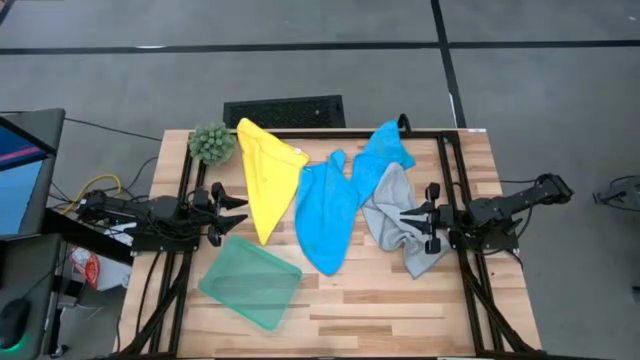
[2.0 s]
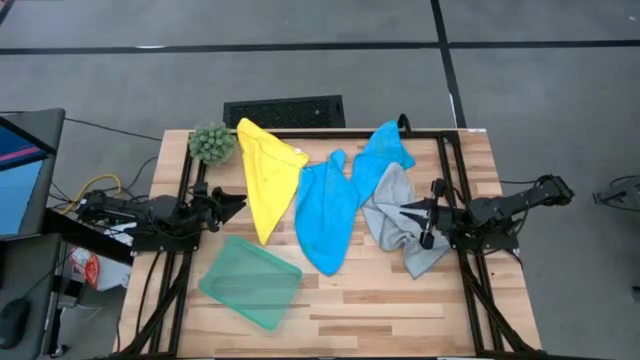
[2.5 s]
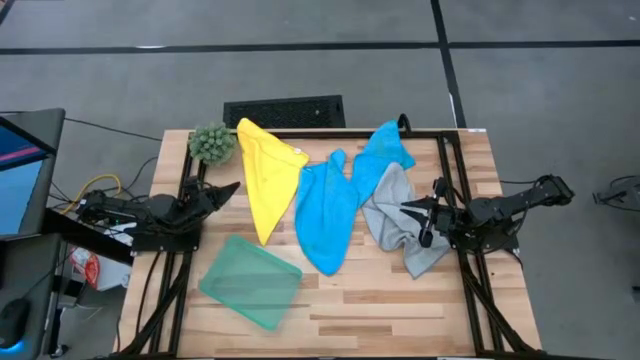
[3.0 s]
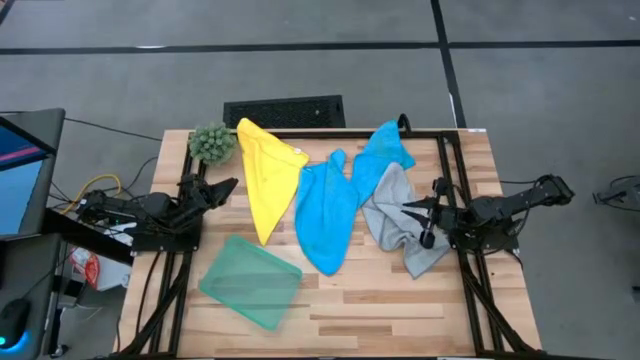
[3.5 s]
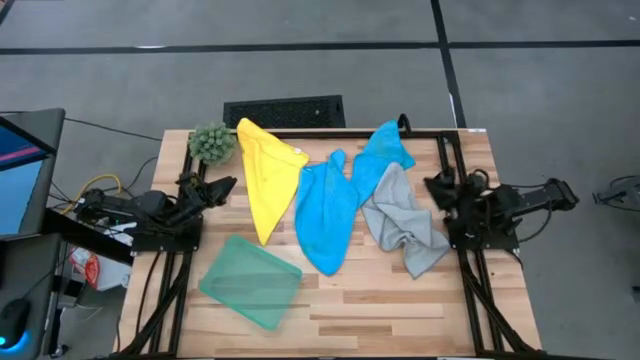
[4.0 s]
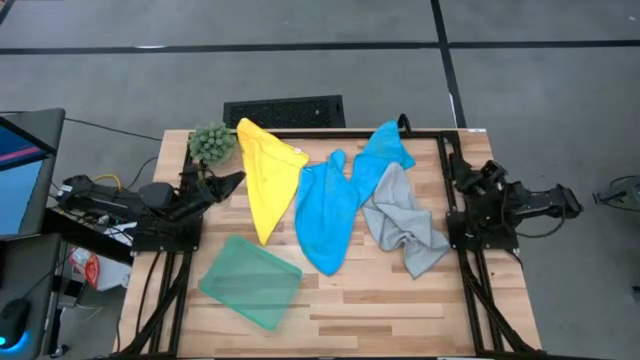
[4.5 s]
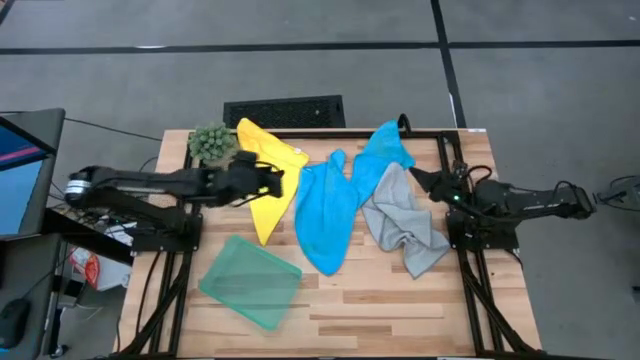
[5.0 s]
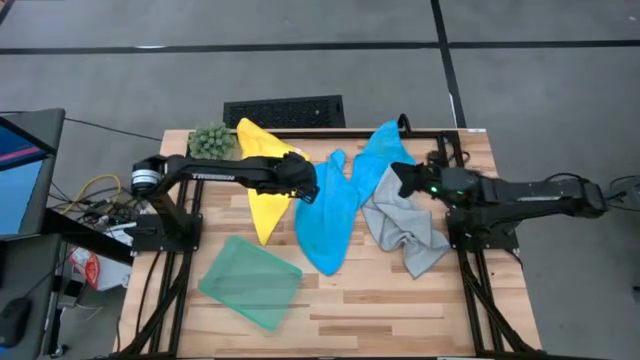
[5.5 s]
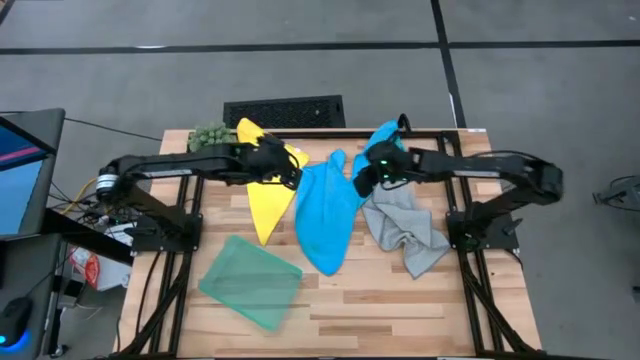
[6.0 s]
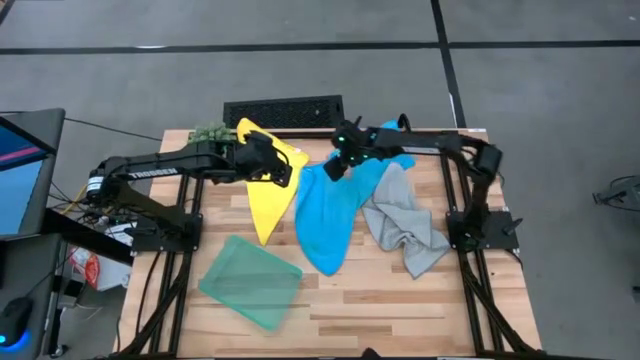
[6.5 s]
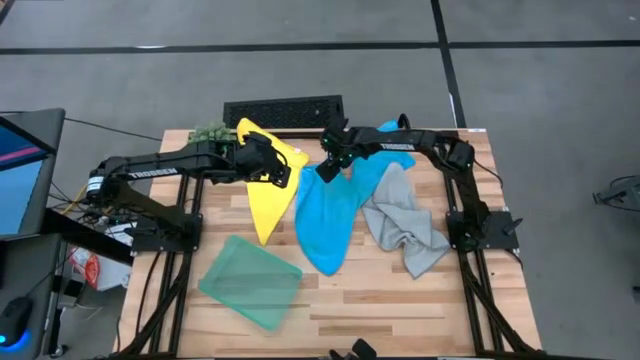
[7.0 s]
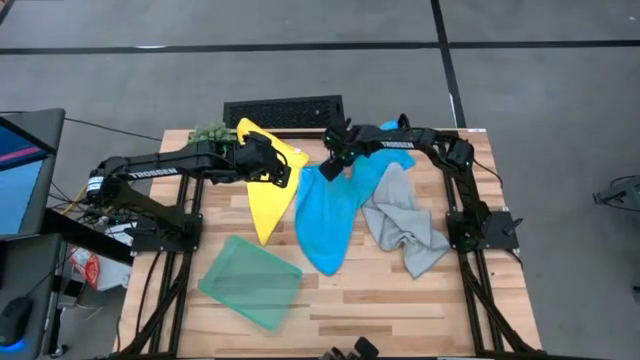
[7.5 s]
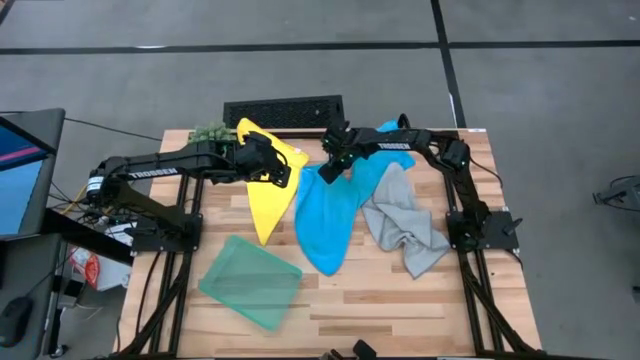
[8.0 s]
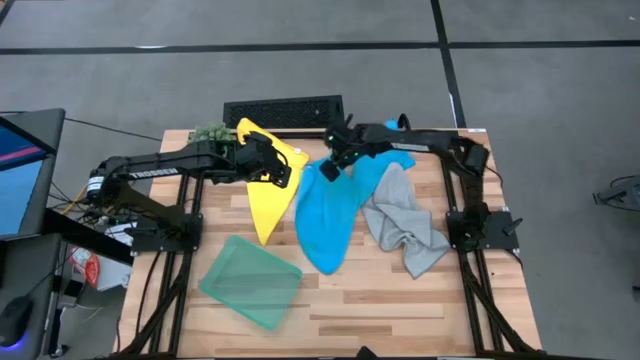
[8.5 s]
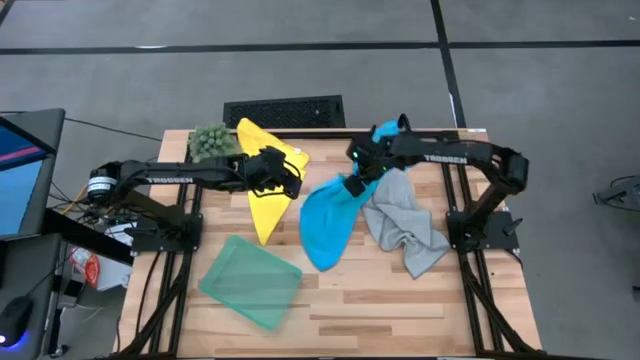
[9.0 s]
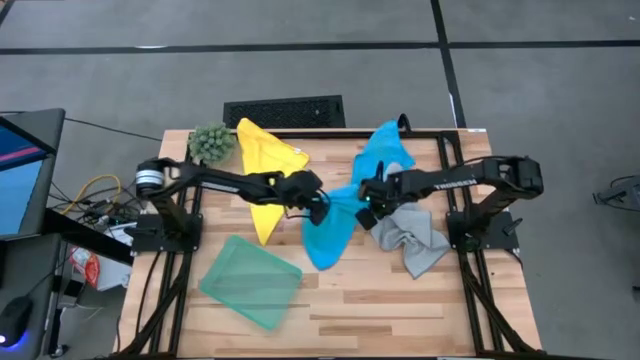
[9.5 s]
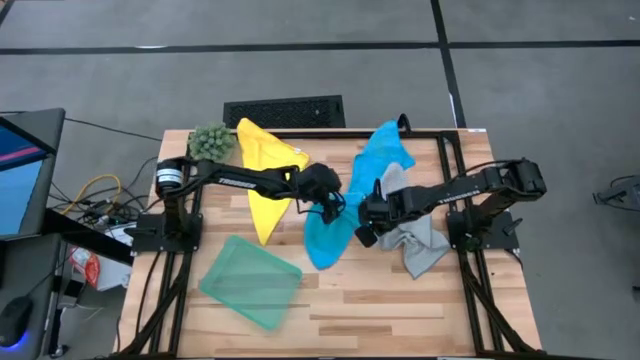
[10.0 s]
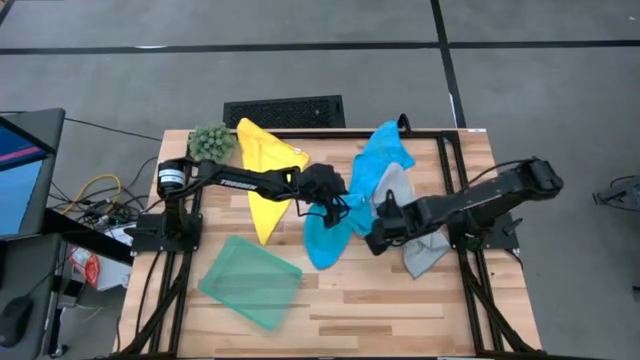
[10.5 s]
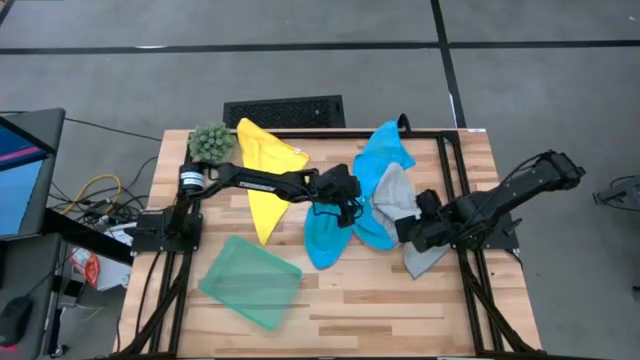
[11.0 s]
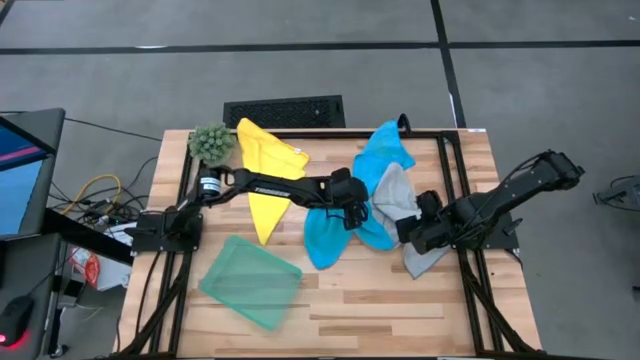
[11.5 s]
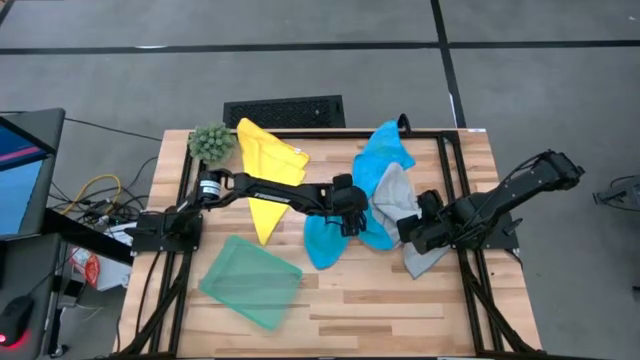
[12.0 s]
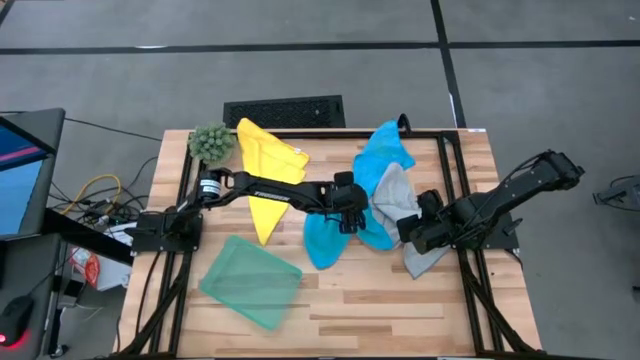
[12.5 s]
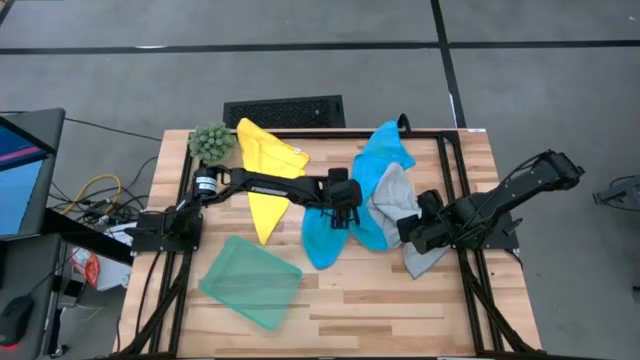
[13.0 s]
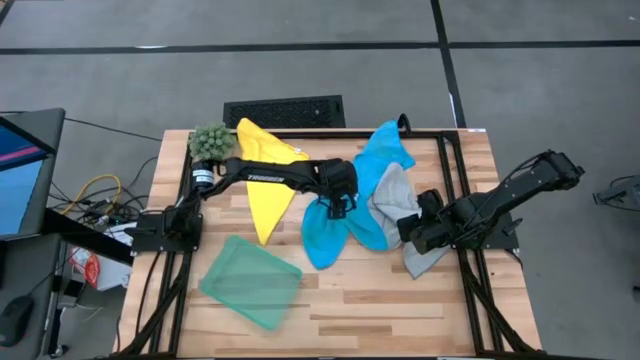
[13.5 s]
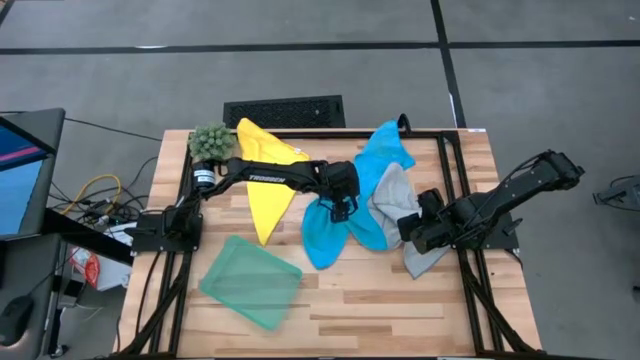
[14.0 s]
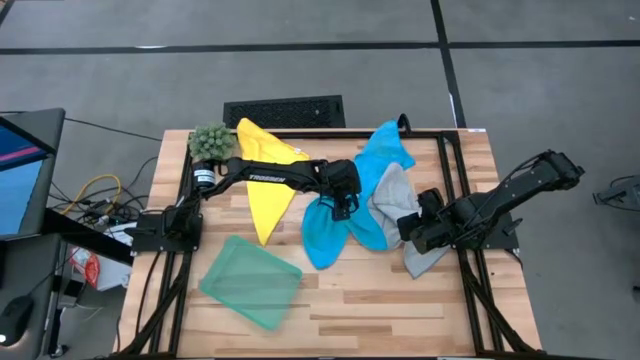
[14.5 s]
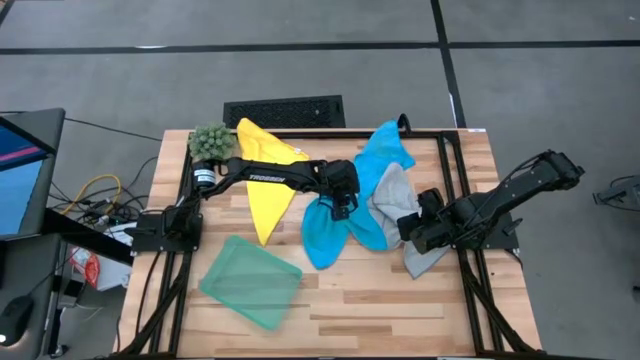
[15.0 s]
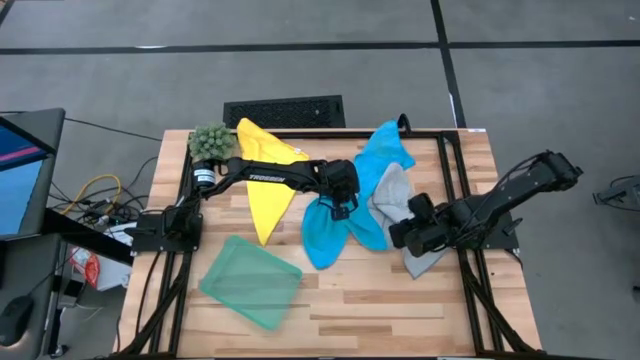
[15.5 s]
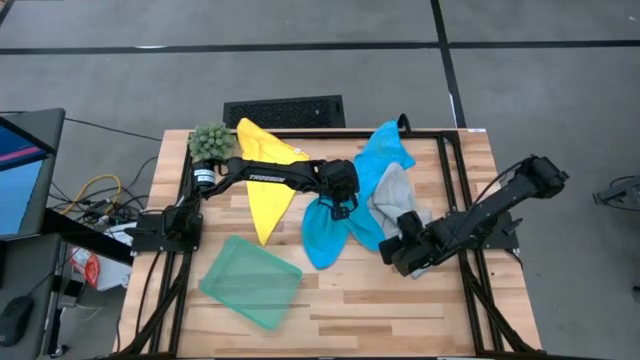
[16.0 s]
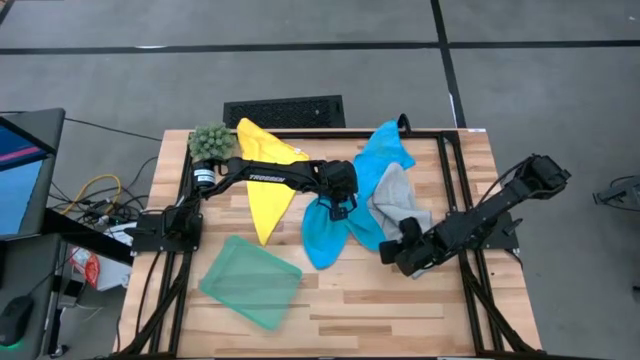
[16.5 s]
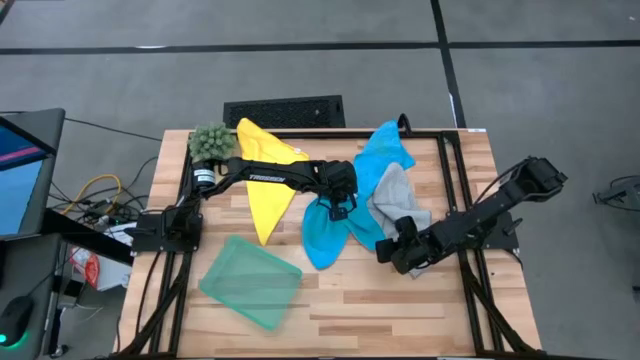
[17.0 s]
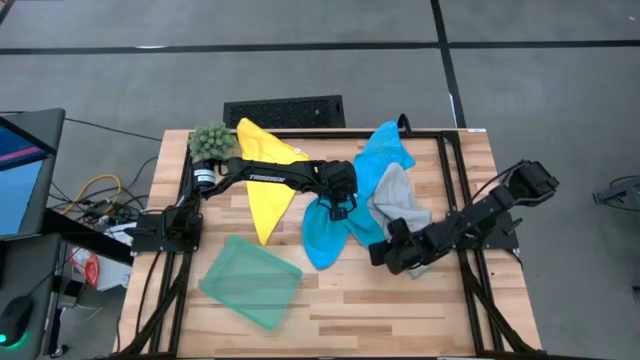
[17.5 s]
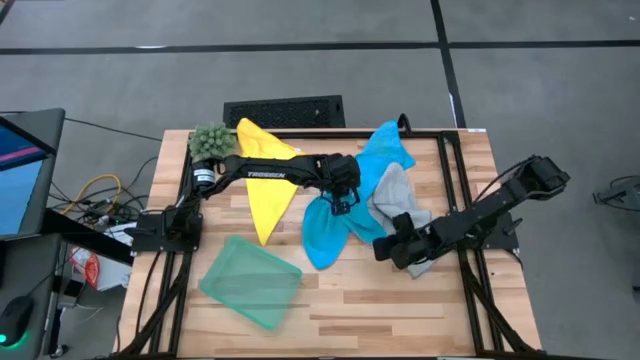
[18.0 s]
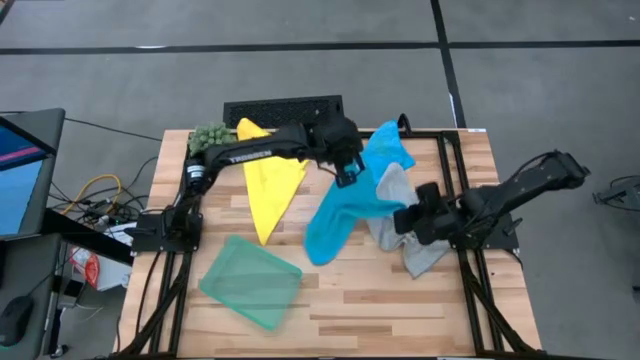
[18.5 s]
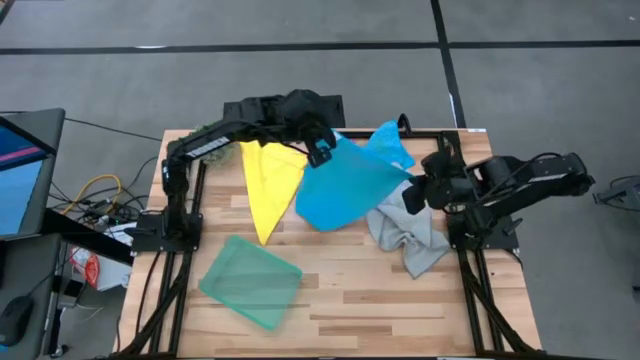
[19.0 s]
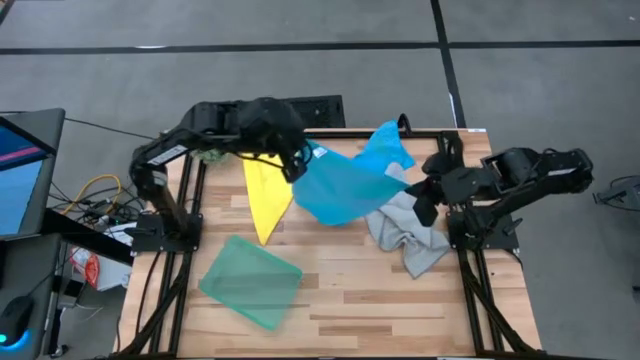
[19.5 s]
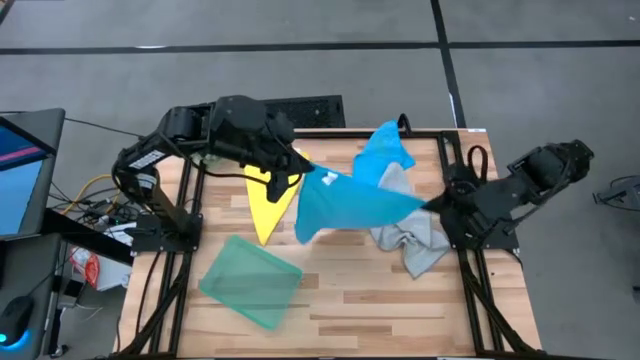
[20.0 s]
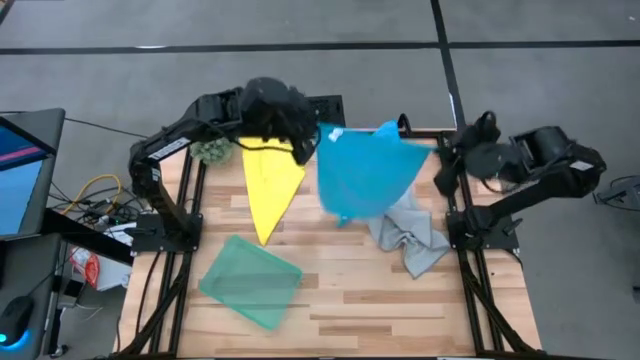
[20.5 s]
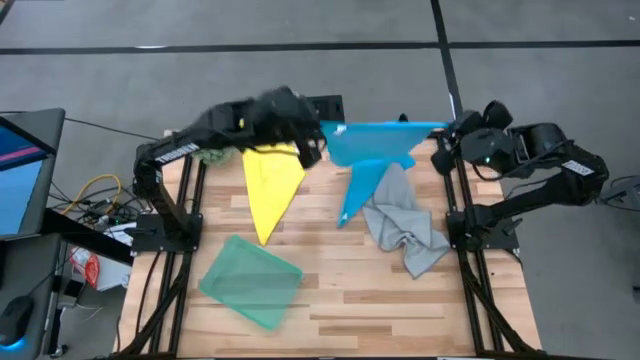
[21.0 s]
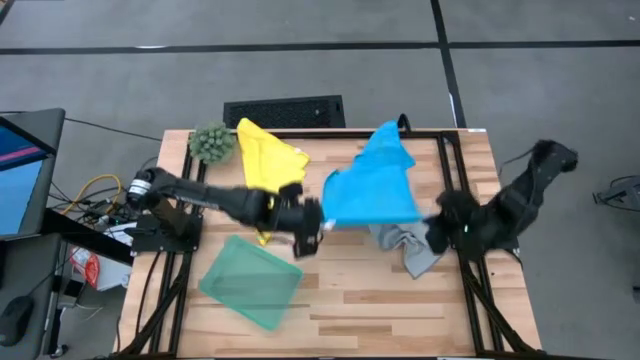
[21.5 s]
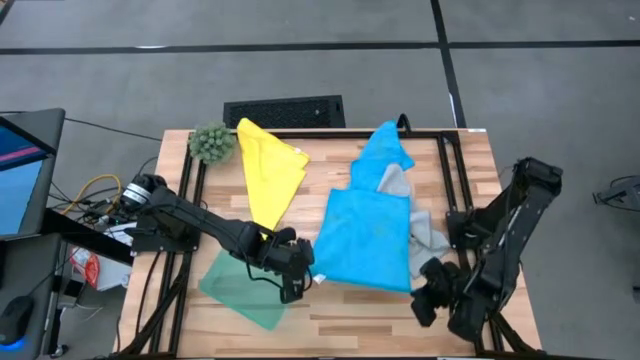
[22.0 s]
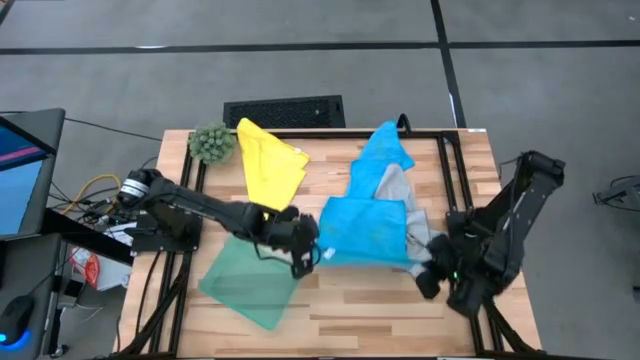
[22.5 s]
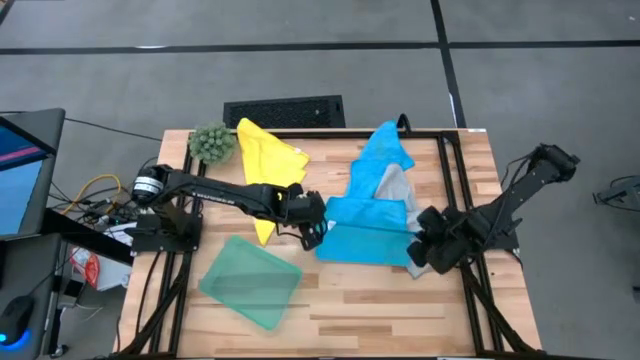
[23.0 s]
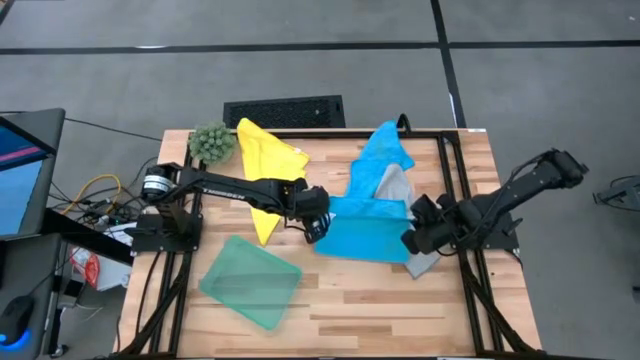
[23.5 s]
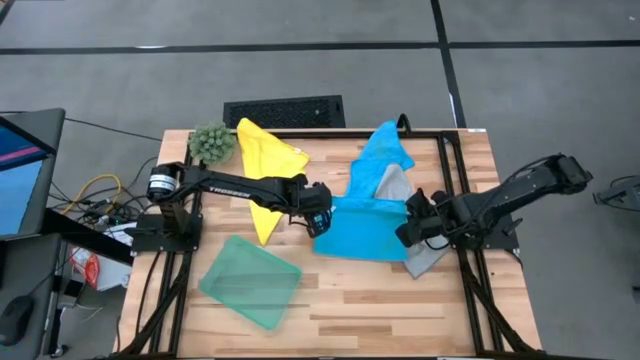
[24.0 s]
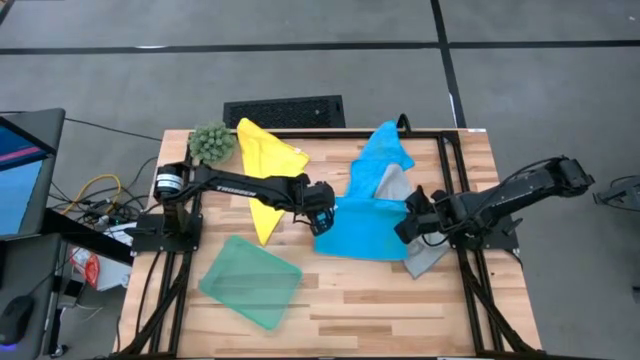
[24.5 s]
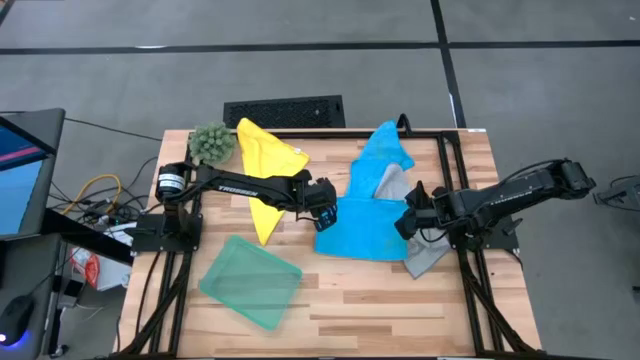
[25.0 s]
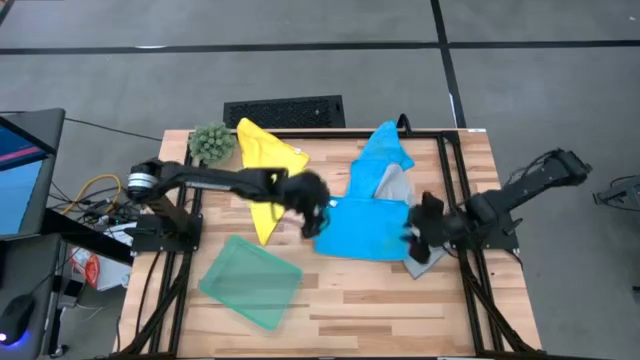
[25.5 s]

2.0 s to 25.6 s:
Task: Fold microfiber towels
Fold the left blue towel
